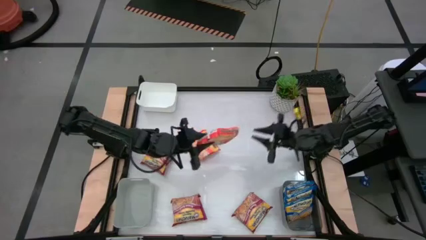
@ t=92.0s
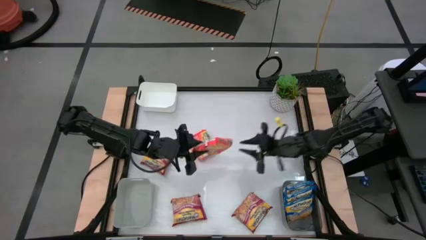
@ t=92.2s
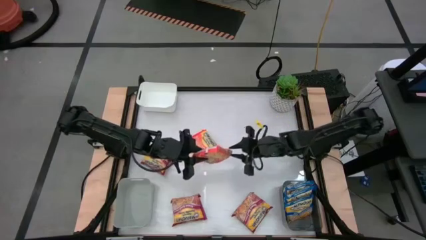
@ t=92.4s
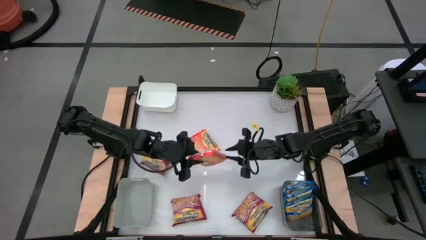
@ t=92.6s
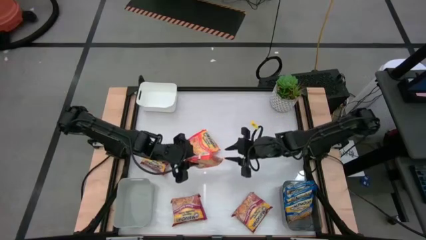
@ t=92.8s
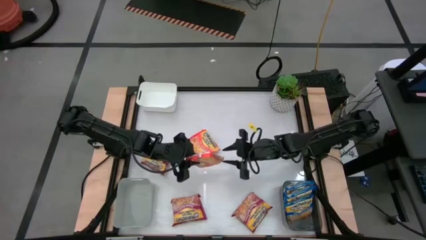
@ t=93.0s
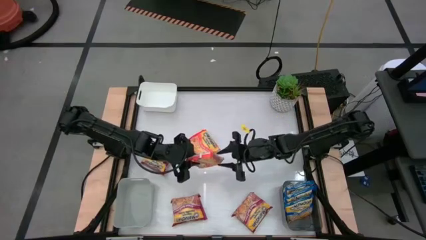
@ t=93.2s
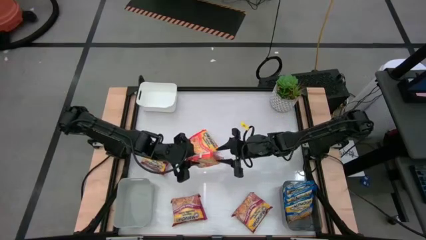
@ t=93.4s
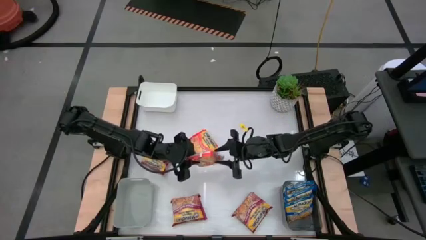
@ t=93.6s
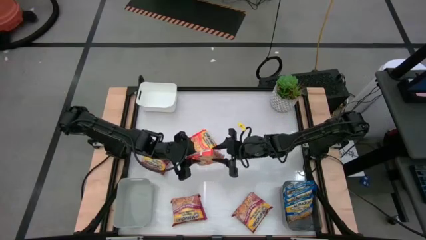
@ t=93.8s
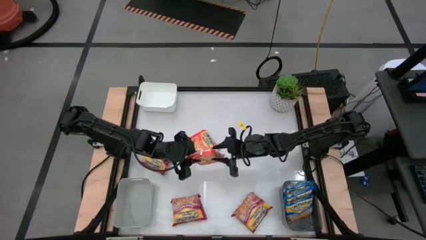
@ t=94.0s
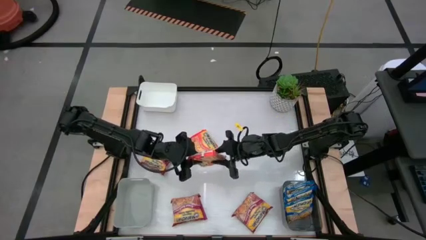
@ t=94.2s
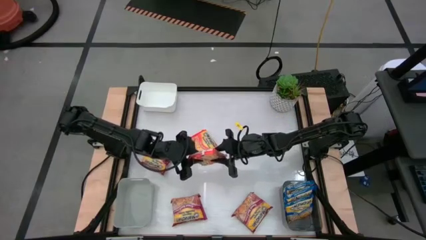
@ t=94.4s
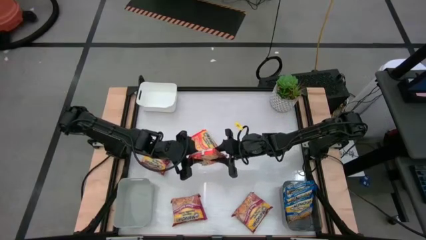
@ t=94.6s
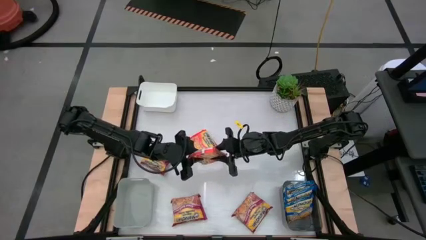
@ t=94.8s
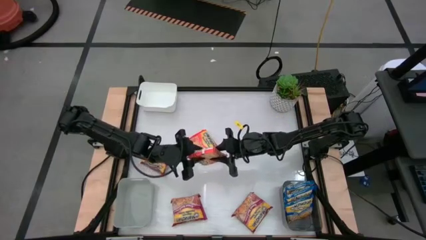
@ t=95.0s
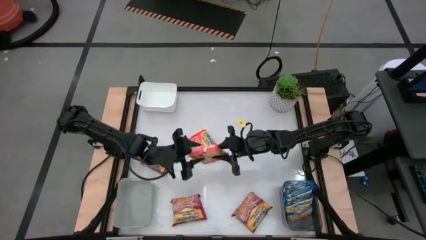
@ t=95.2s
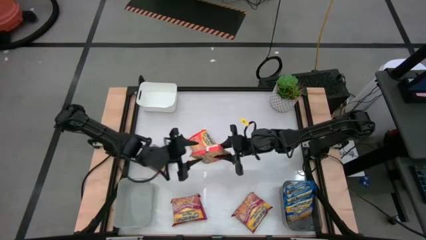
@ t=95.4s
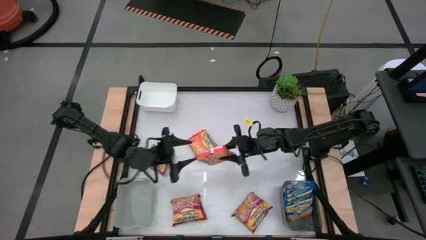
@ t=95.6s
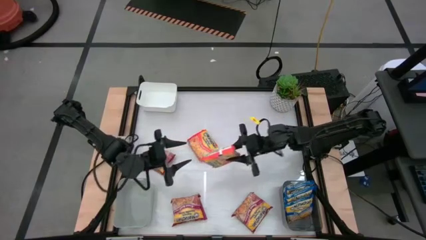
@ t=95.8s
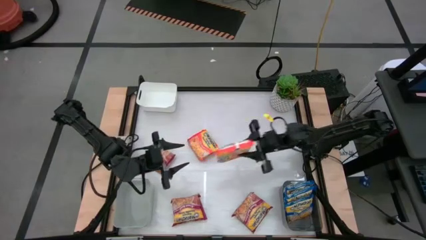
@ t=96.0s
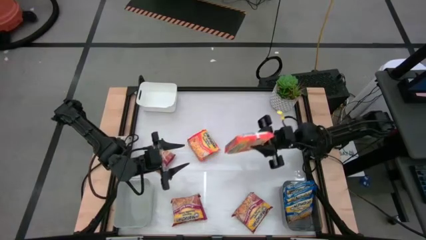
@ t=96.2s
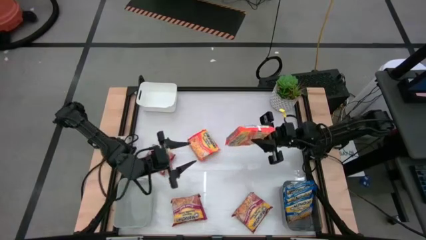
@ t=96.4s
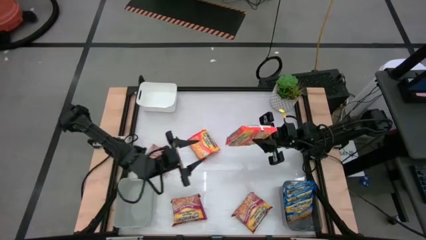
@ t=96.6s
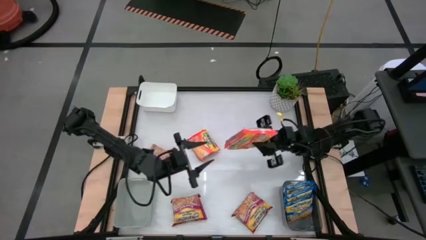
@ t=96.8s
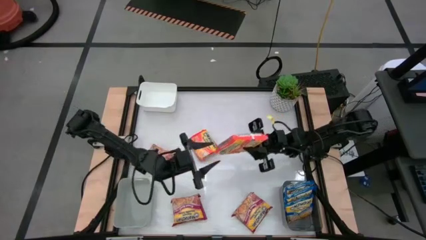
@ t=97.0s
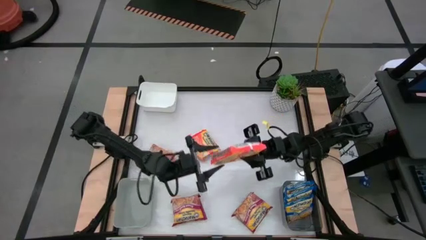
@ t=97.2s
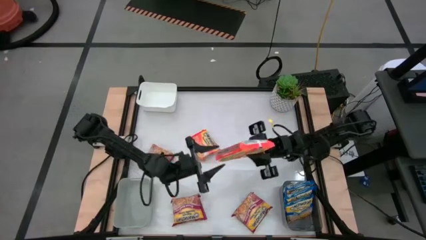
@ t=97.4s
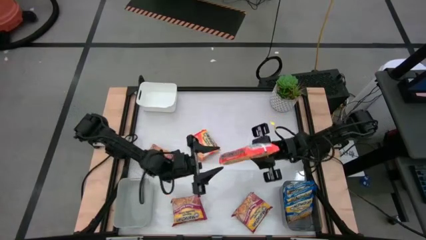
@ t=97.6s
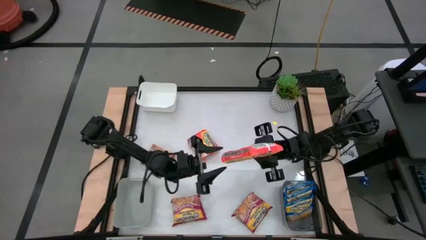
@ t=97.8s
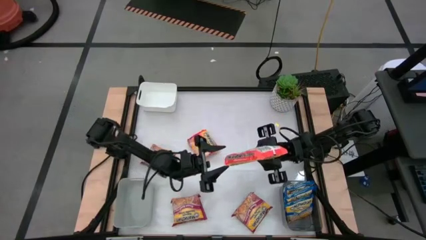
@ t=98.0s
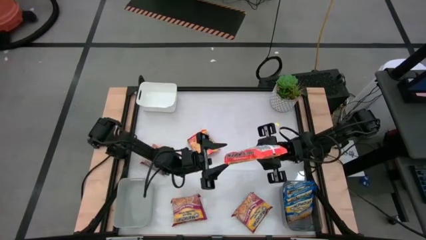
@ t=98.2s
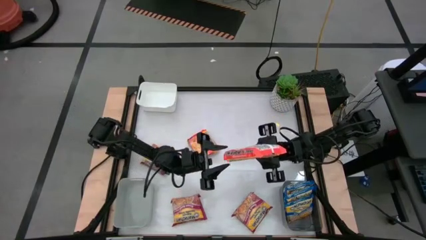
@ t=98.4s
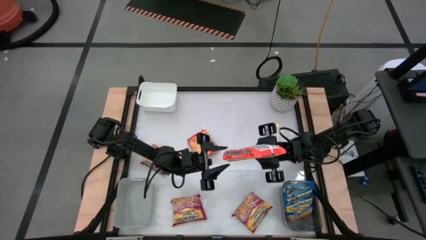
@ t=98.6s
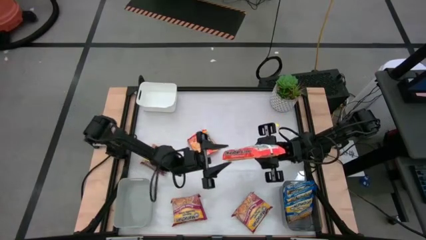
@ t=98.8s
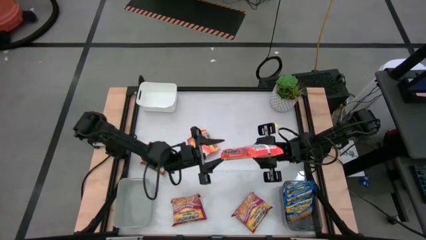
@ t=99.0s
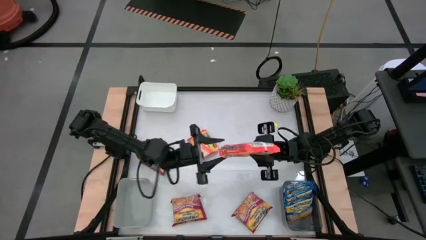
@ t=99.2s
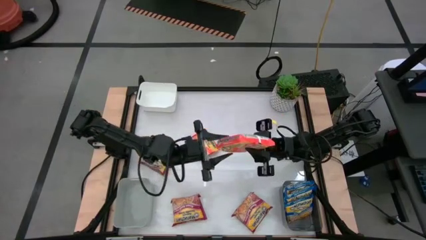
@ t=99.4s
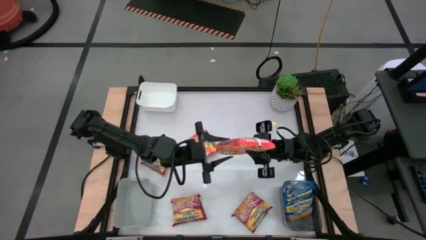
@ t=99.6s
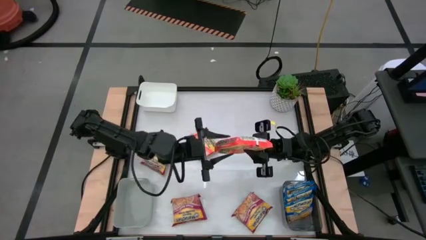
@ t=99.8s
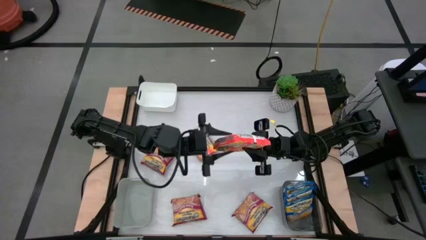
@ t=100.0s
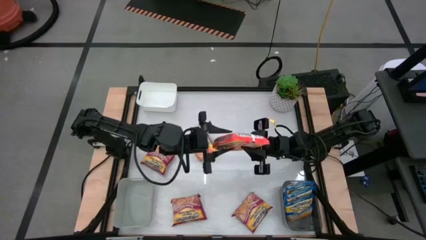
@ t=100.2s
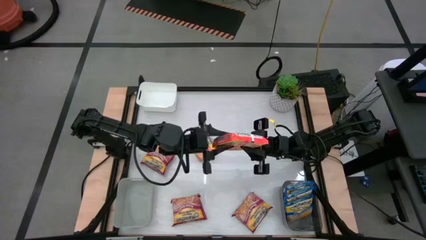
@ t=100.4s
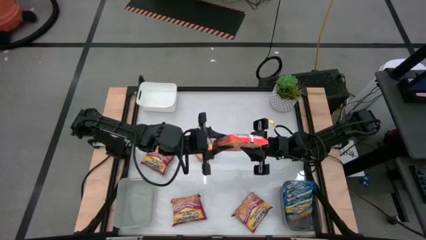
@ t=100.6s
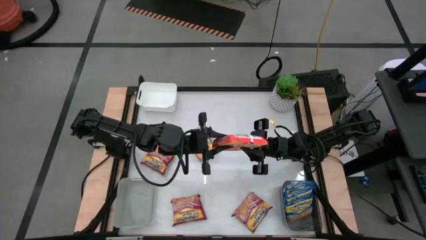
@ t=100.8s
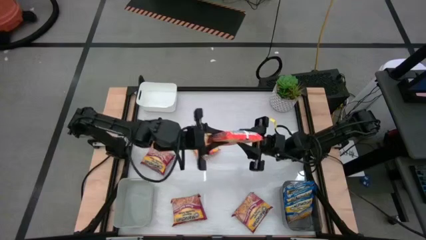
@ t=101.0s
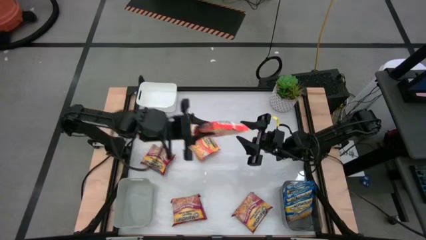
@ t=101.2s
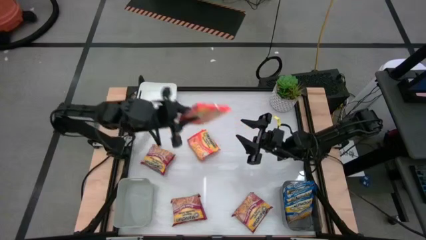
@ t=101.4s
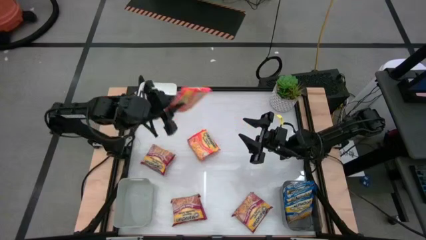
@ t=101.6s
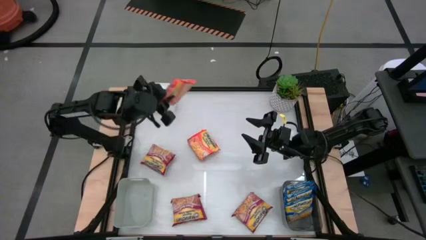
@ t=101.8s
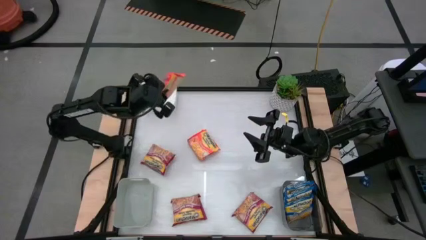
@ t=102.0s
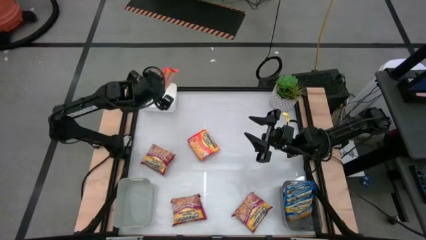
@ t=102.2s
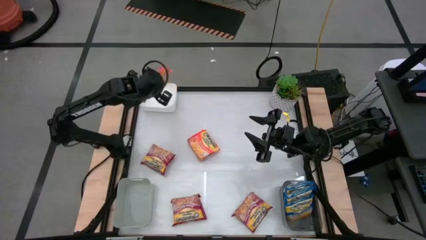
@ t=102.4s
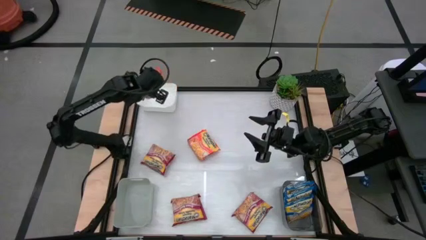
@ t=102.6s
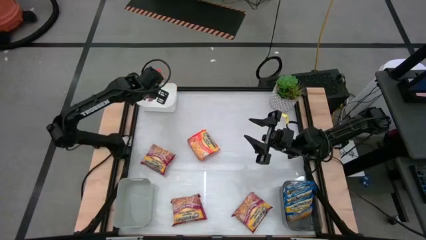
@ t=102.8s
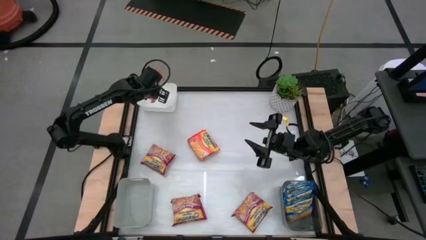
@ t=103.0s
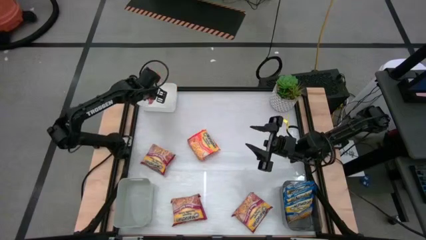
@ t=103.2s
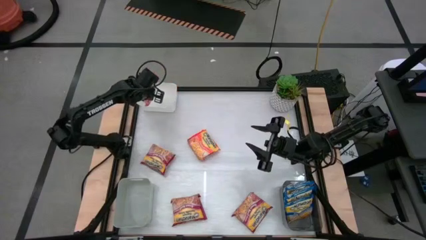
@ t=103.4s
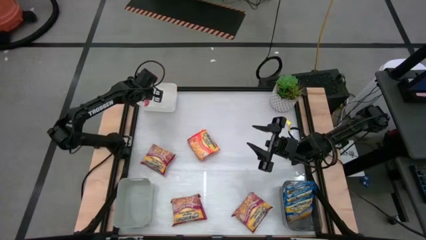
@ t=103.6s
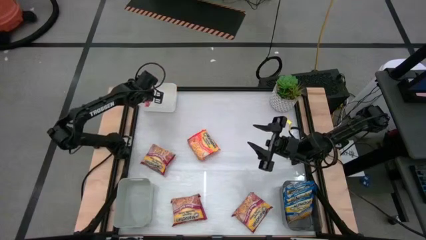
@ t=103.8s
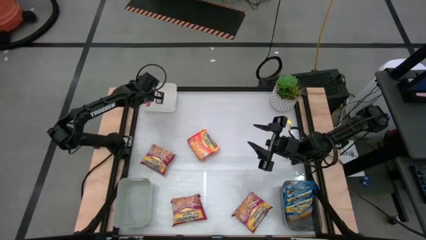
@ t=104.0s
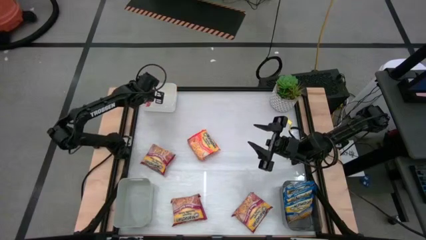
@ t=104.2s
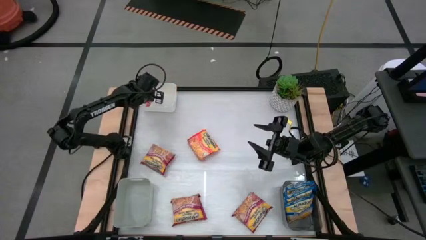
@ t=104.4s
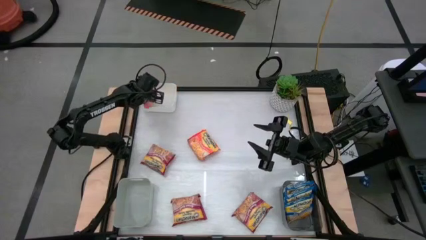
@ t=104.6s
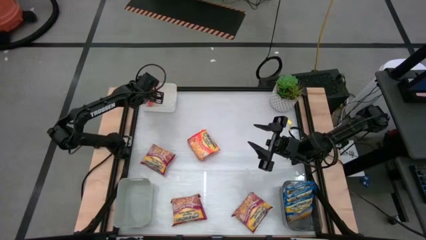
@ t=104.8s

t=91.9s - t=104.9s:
Task: Sort Maruchan noodles
Put the bottom orange noodle pack into the white bin

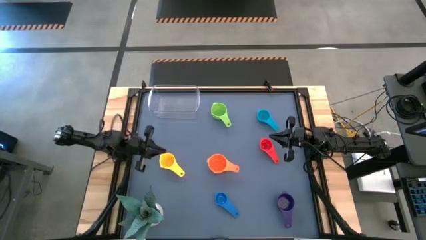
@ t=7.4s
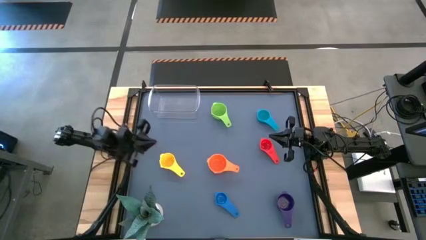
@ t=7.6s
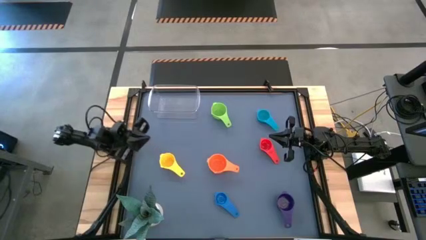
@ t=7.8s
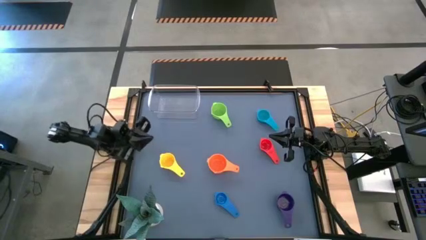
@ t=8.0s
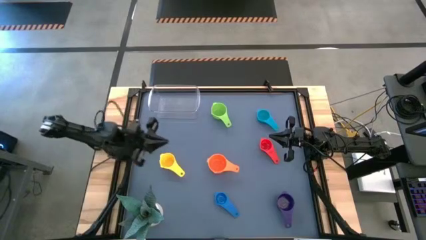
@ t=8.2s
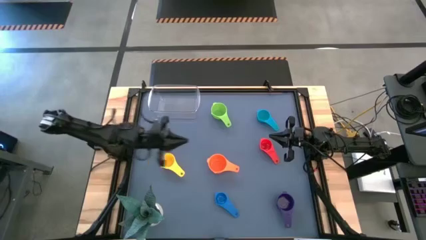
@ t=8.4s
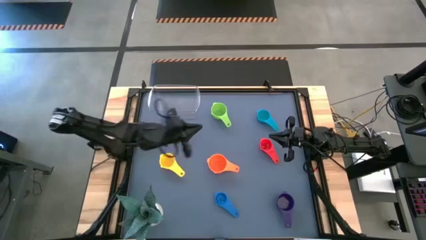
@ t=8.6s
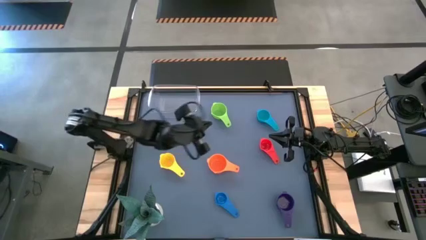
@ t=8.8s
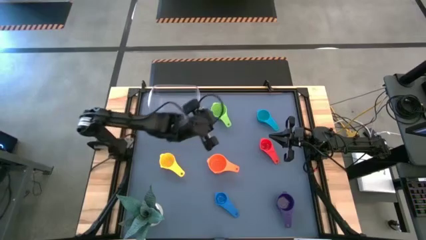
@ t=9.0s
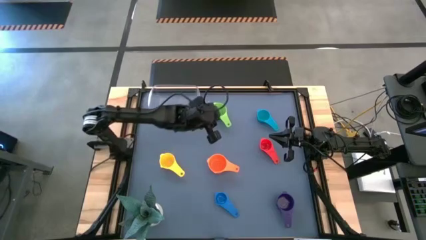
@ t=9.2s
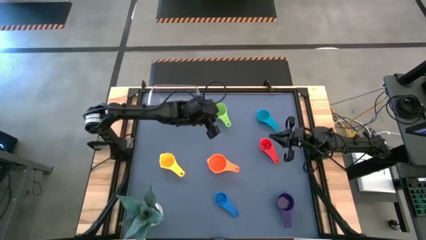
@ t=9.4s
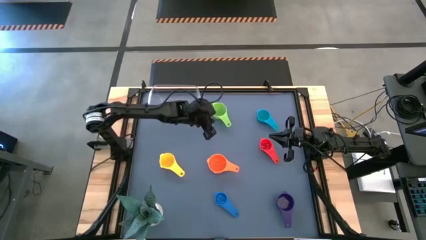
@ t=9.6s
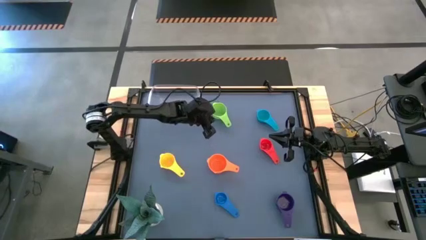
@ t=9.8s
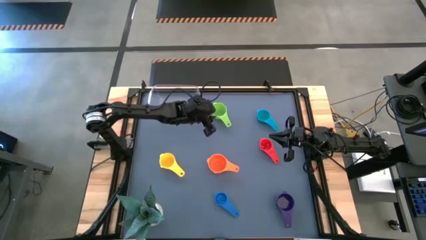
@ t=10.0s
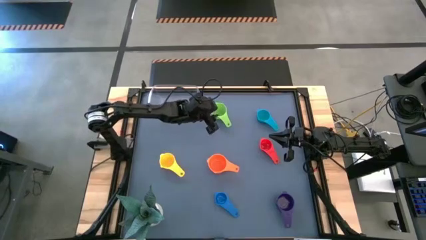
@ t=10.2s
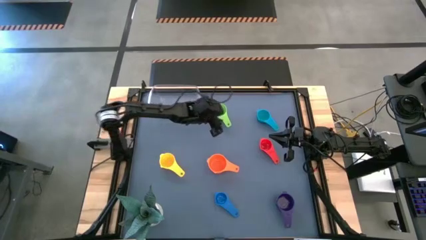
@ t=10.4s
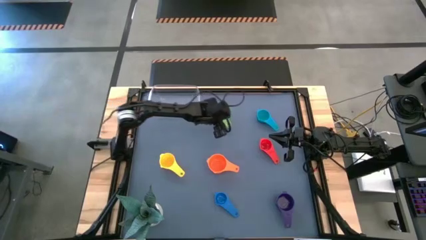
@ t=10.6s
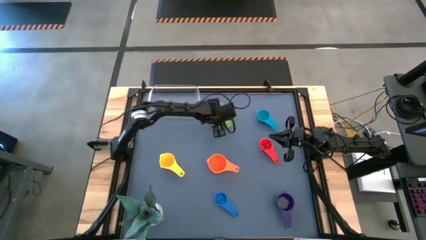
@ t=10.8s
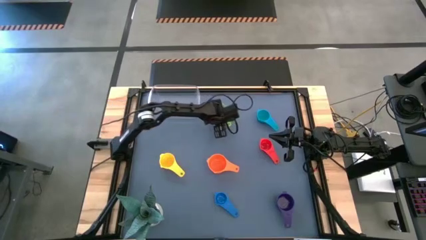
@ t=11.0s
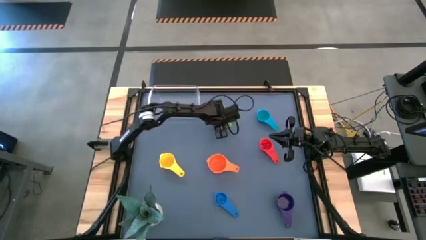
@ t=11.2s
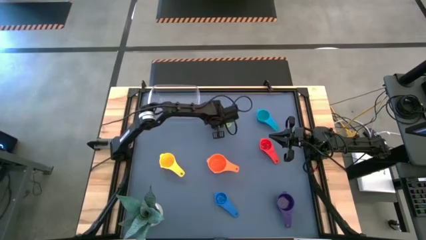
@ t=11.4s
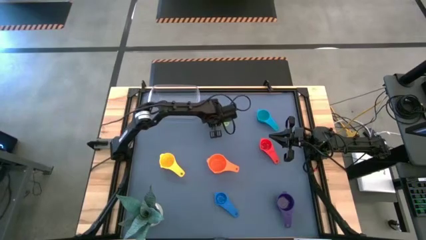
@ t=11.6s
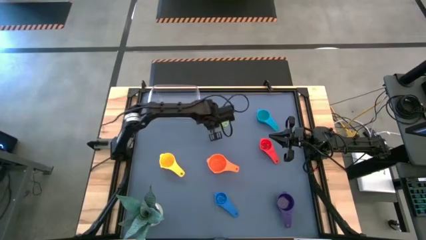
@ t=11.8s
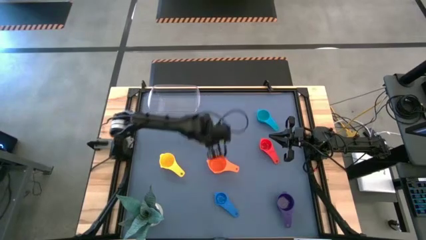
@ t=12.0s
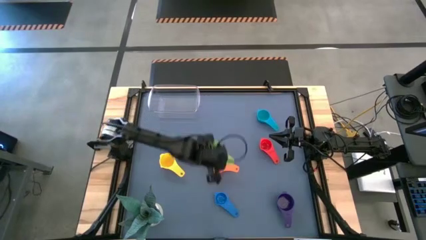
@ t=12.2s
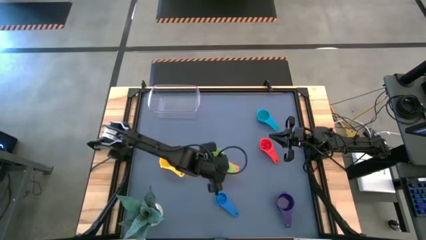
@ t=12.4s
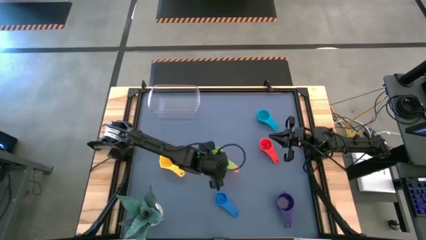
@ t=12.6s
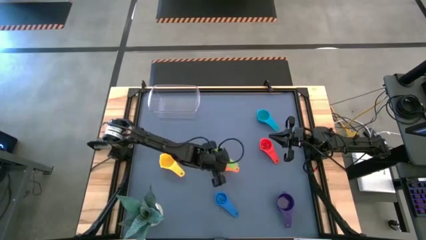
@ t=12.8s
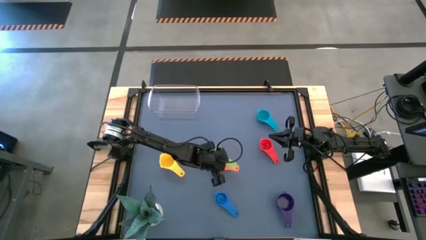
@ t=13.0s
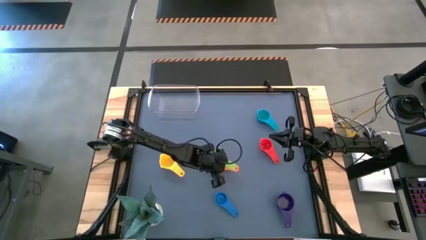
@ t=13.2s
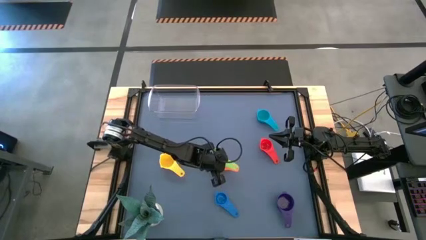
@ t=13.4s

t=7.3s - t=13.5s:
Task: Nest measuring cups in basket
Stack the green measuring cup on top of the orange measuring cup
